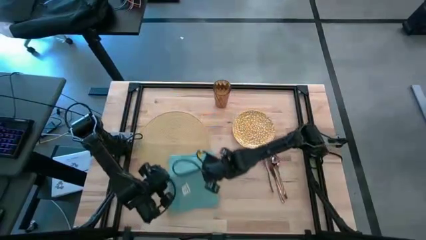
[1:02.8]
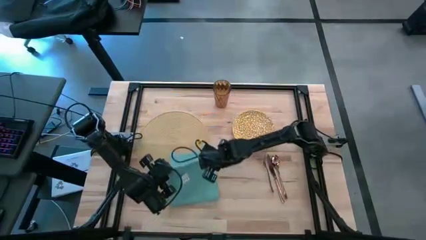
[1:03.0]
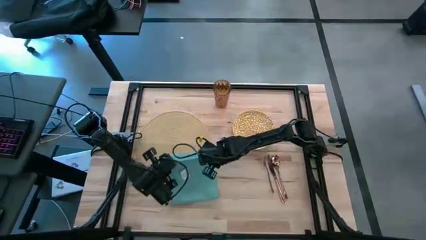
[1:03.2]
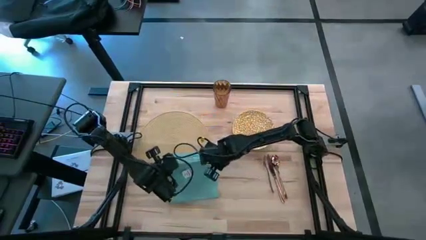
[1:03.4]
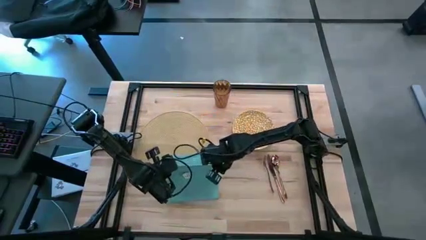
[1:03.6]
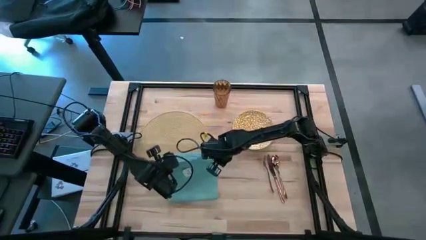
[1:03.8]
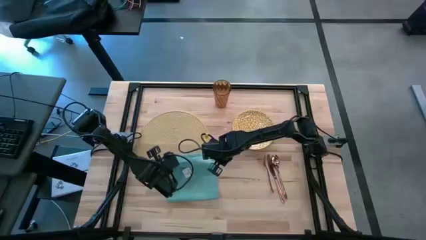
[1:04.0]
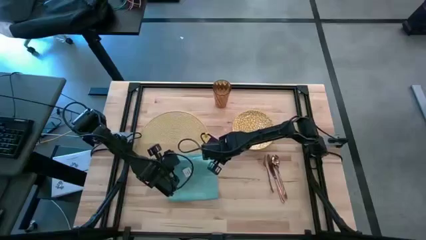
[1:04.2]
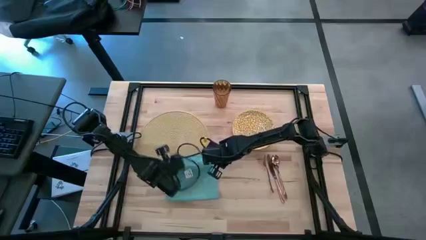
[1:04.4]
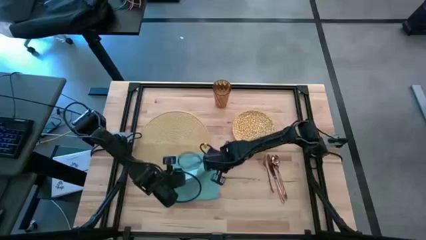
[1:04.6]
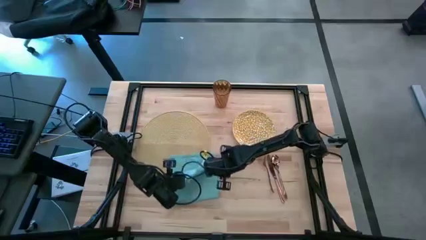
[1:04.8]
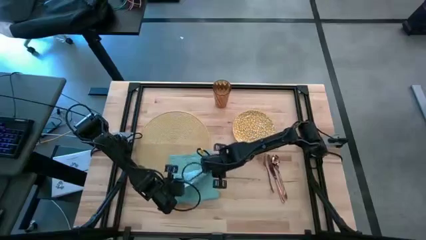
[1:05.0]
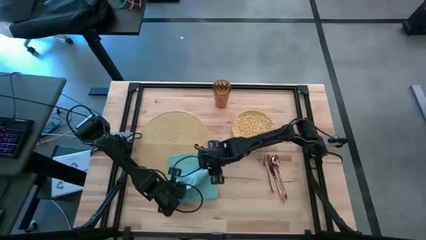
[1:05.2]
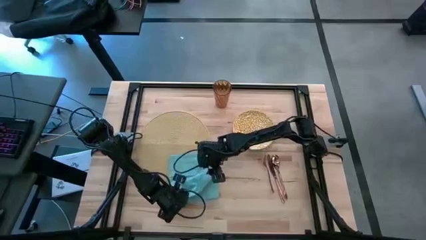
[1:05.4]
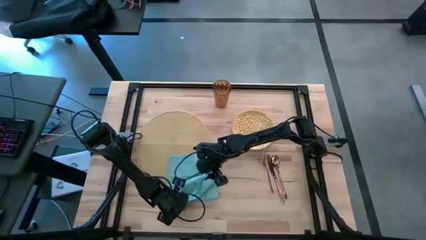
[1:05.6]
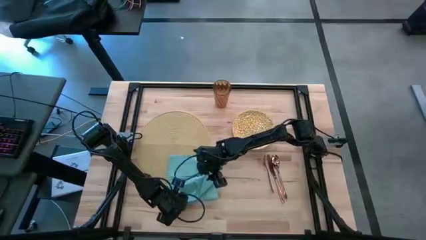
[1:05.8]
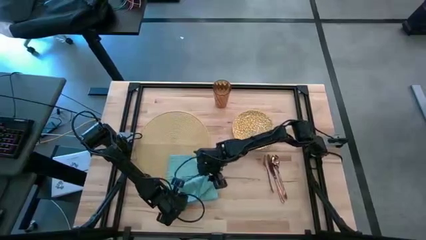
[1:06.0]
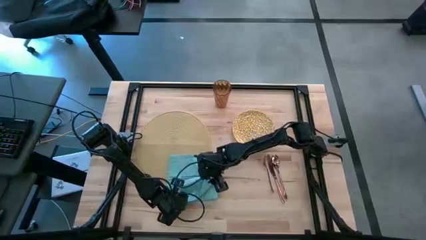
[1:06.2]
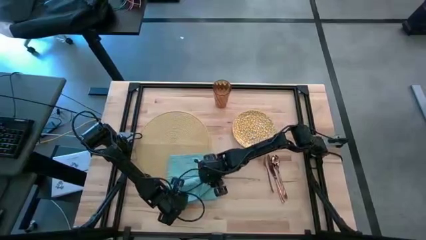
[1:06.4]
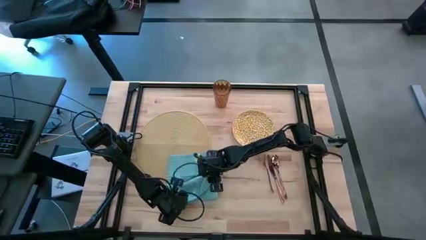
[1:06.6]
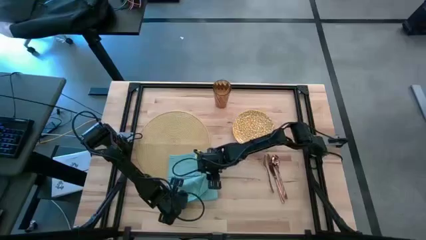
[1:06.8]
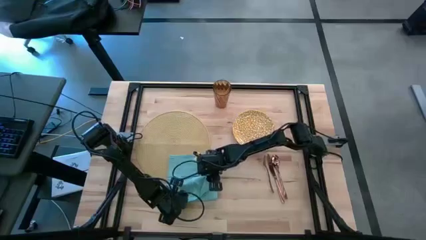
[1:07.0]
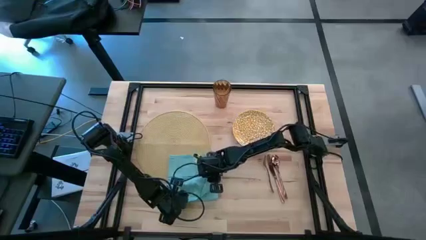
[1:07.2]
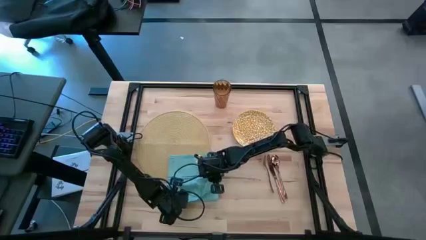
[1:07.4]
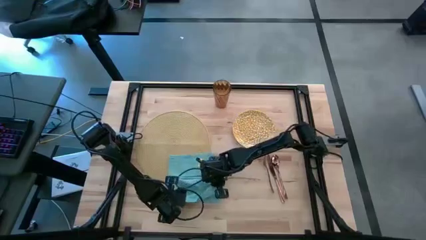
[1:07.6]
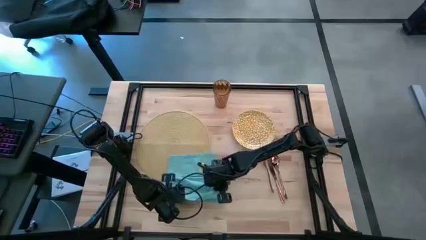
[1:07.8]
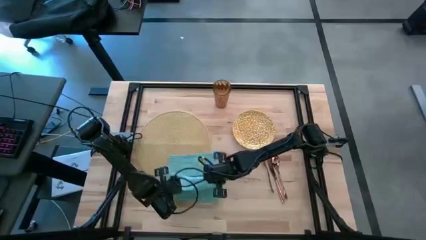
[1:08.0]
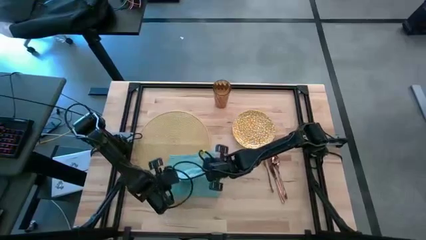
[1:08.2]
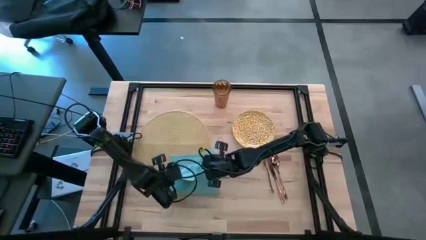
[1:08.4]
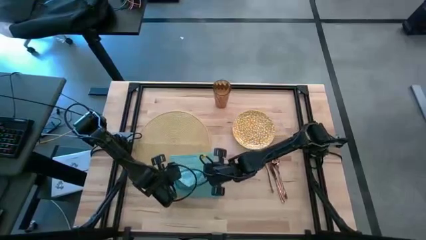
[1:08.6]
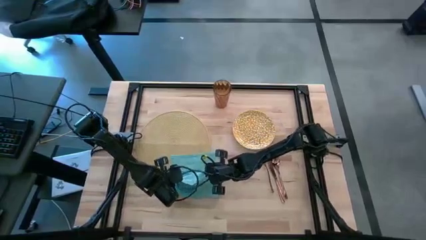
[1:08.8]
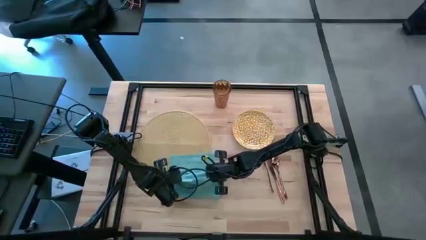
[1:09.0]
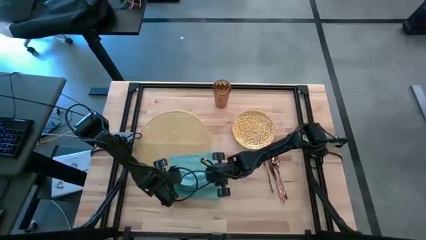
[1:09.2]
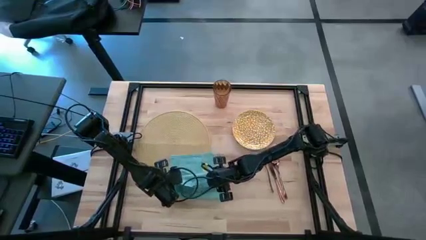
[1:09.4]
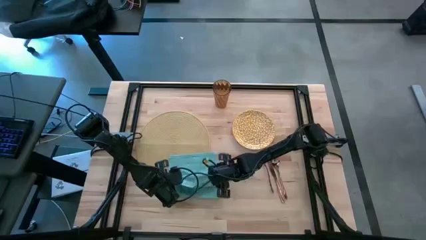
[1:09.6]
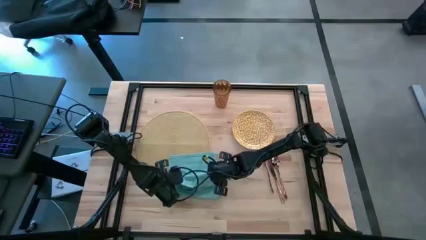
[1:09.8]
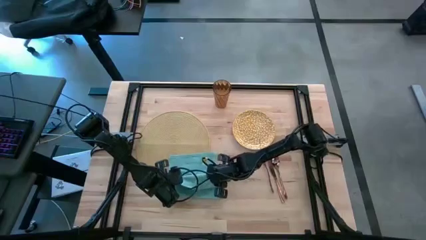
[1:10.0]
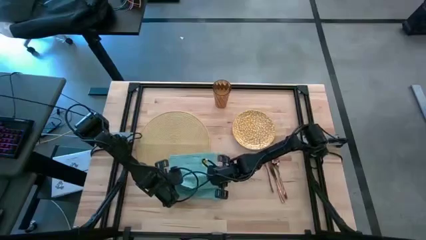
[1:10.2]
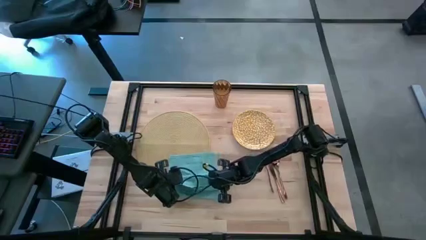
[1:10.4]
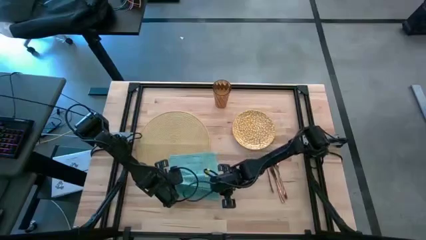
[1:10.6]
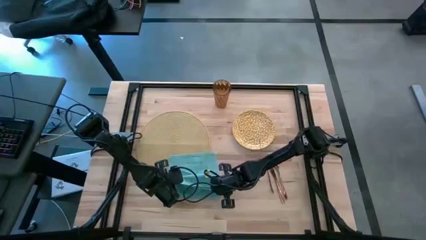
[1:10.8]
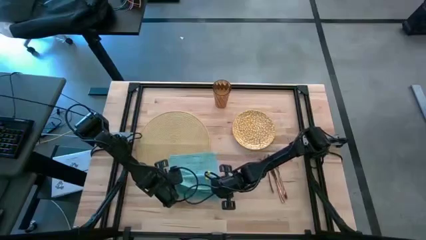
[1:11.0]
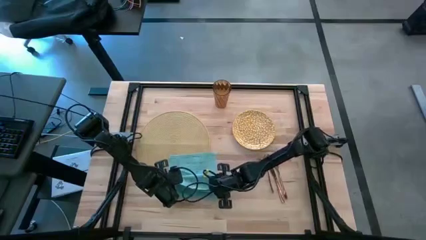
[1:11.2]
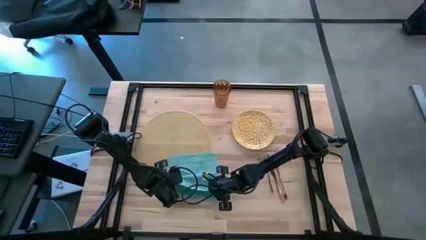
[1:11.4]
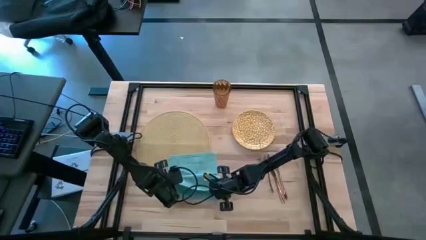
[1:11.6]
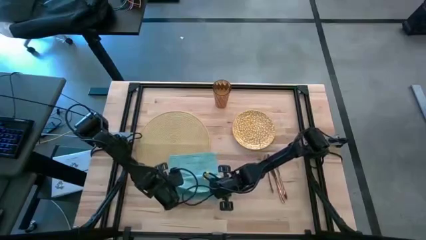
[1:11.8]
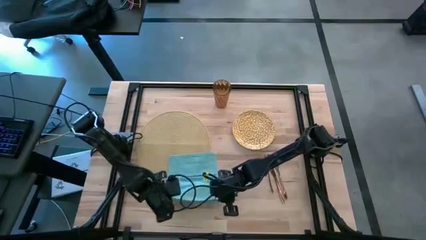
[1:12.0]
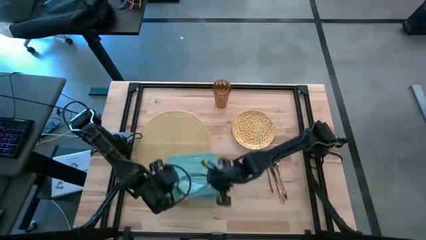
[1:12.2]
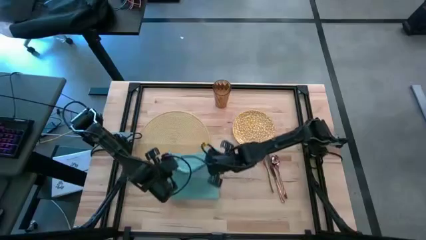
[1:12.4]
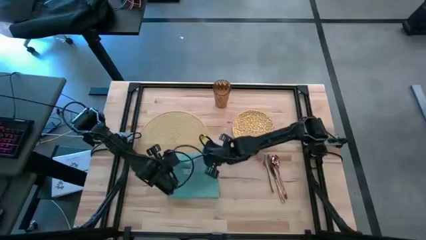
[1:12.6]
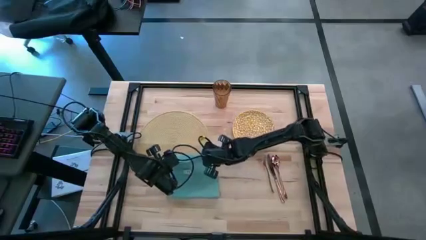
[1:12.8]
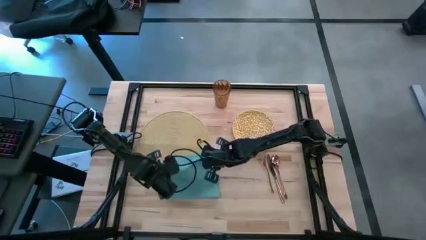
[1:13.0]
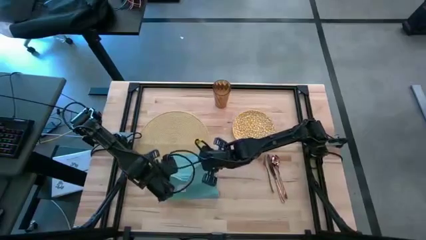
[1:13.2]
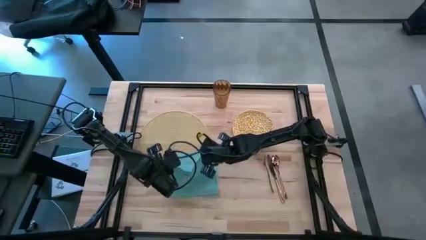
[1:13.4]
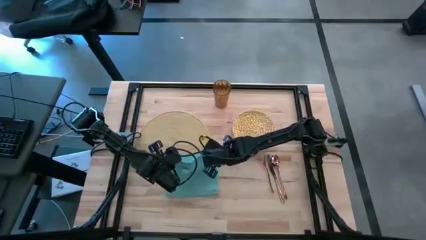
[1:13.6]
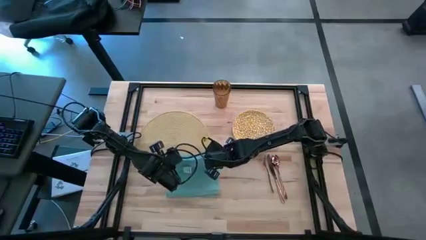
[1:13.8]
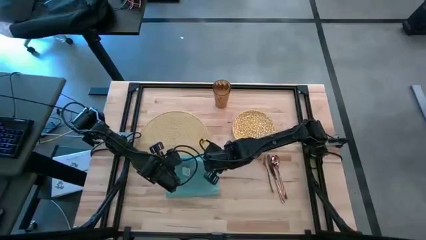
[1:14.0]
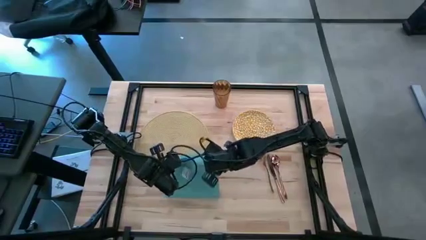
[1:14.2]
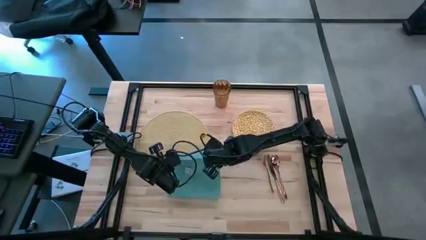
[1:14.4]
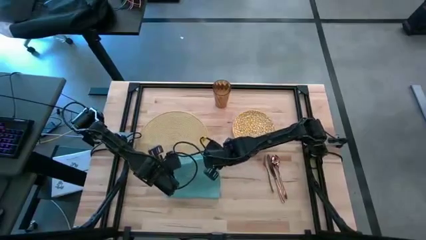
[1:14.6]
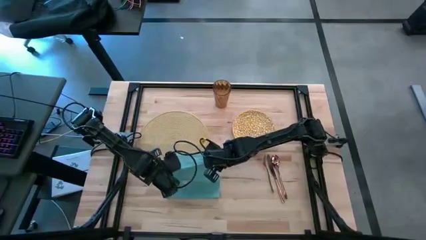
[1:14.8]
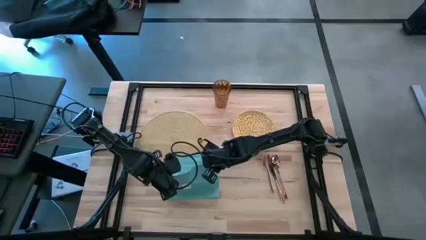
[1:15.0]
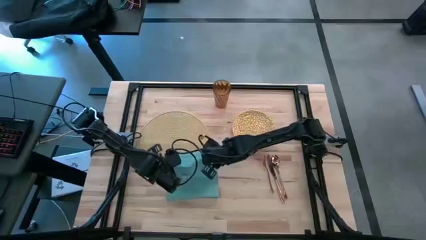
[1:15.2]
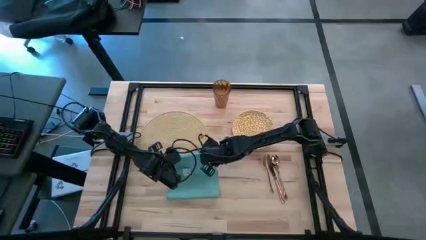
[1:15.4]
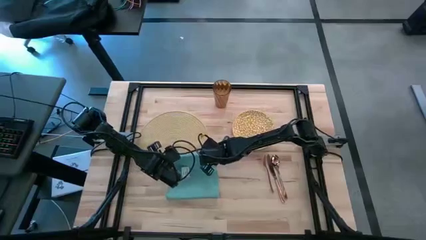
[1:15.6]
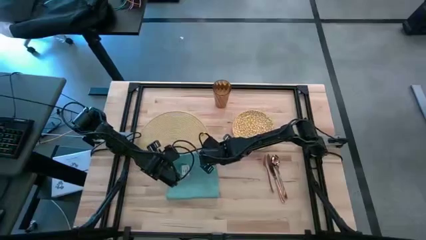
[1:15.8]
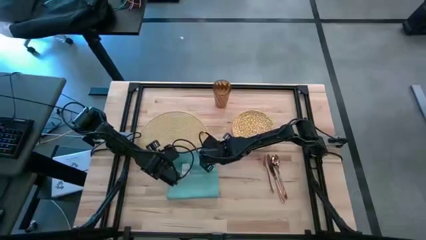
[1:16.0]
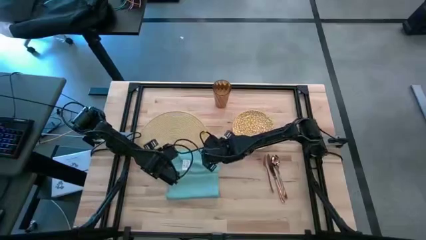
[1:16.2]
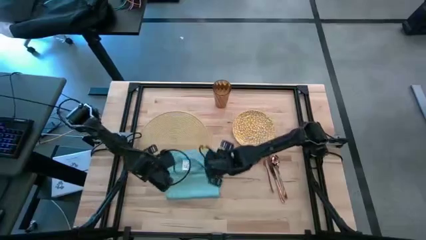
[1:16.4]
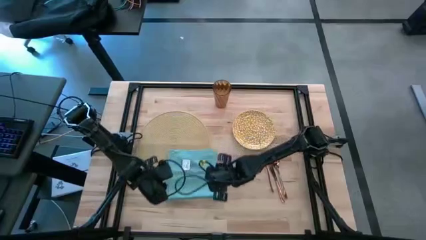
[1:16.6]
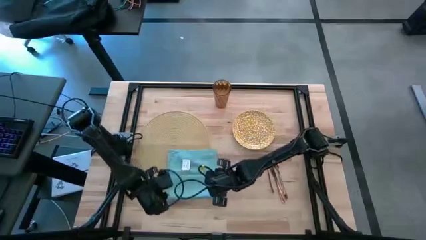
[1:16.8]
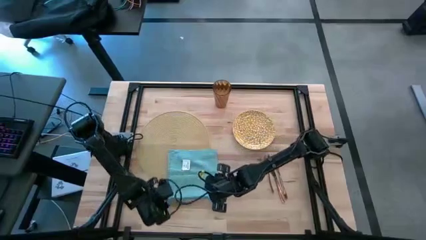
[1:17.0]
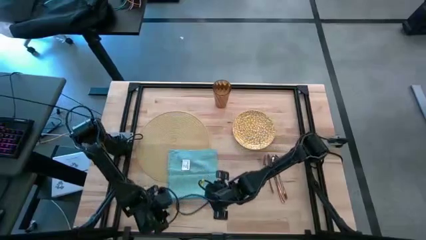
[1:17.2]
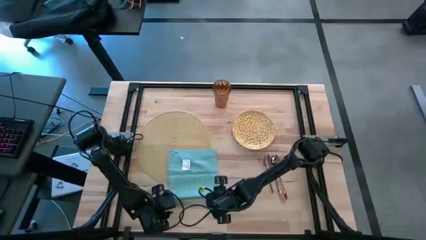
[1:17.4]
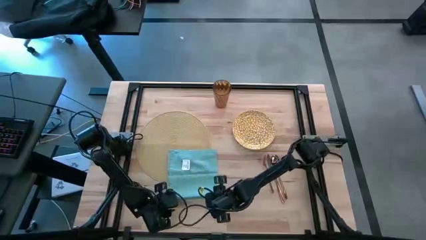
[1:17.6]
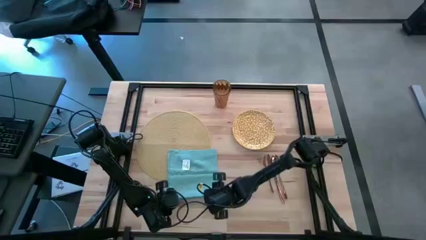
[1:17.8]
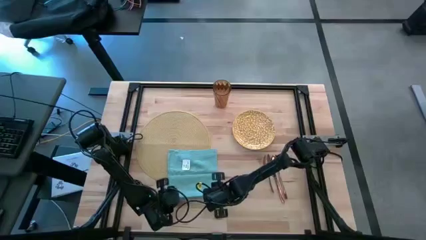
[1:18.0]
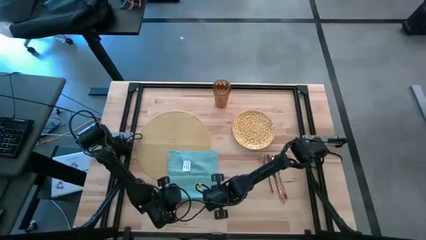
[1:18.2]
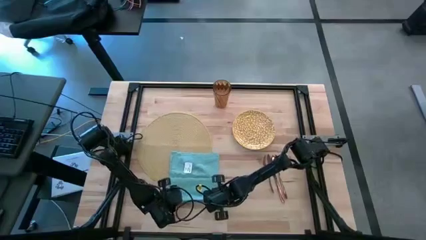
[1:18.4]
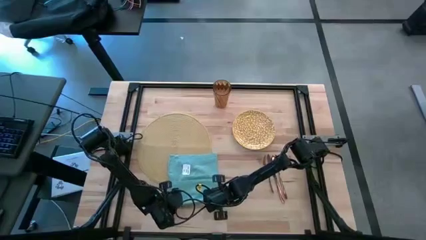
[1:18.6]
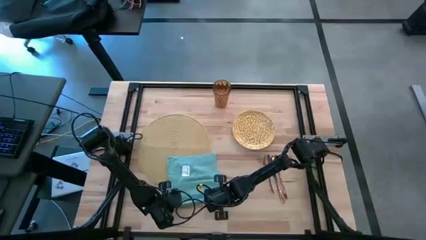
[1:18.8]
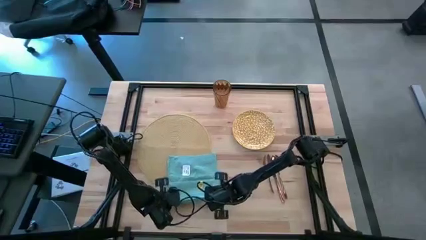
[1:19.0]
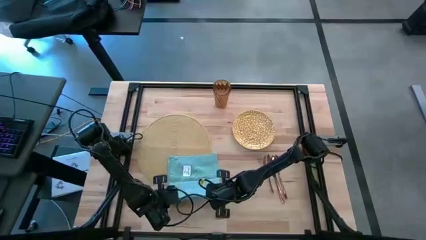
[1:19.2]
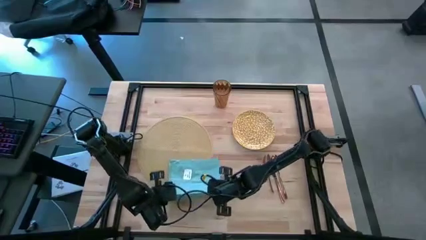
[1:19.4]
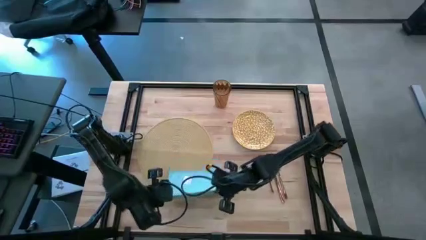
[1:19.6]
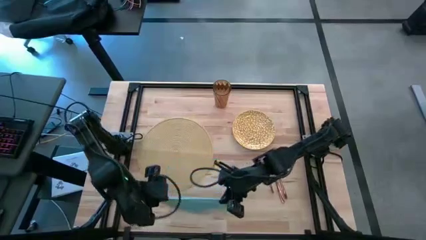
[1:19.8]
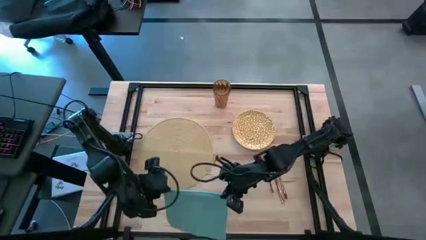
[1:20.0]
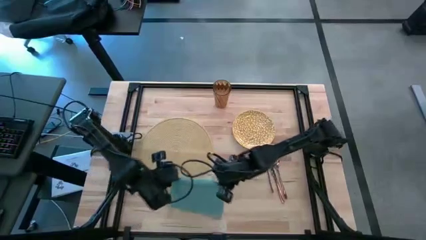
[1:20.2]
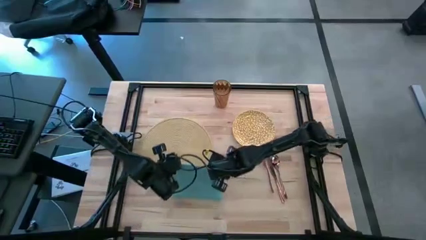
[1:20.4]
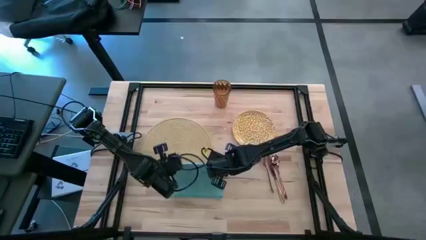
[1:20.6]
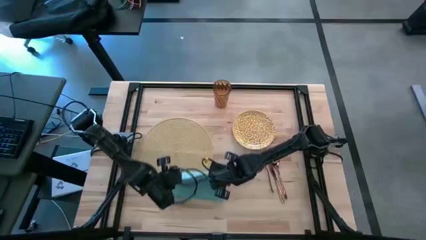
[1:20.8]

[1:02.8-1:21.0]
Task: Set table place
Fold the blue table napkin
